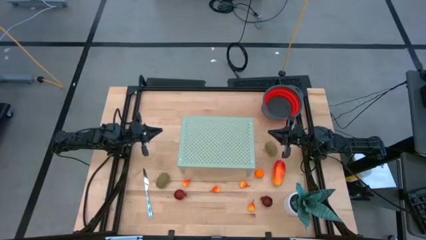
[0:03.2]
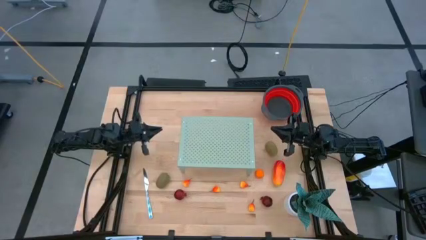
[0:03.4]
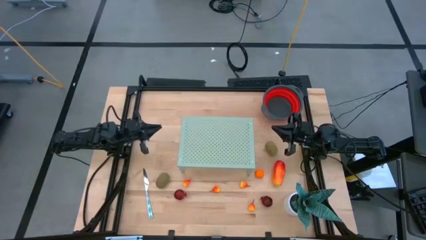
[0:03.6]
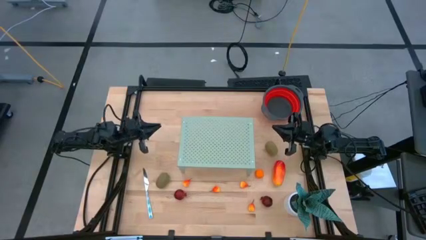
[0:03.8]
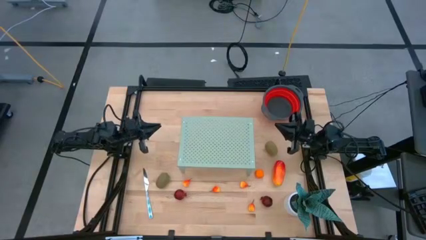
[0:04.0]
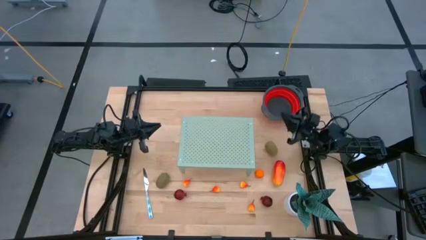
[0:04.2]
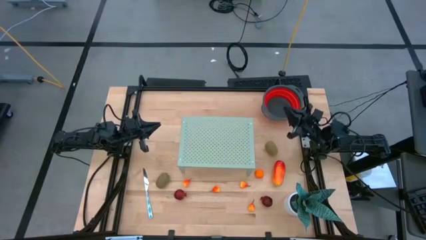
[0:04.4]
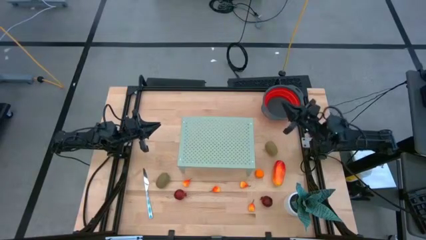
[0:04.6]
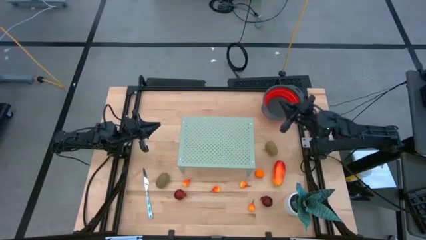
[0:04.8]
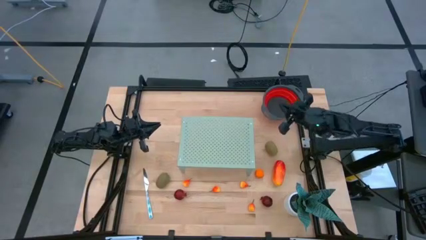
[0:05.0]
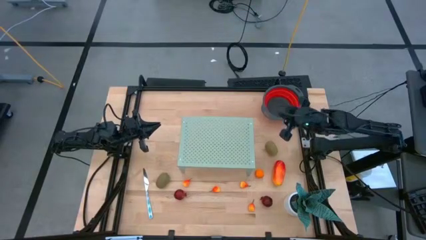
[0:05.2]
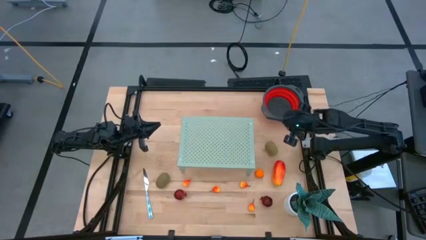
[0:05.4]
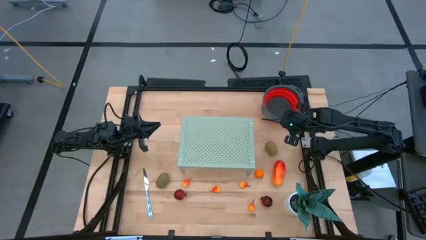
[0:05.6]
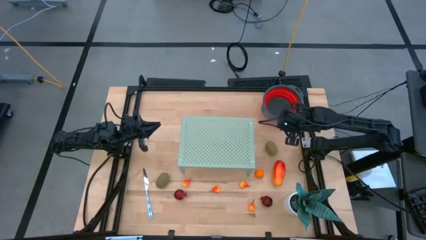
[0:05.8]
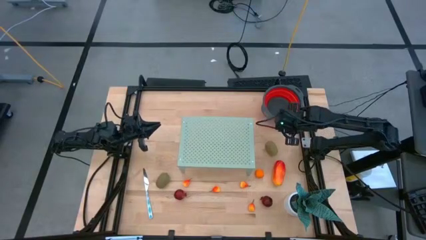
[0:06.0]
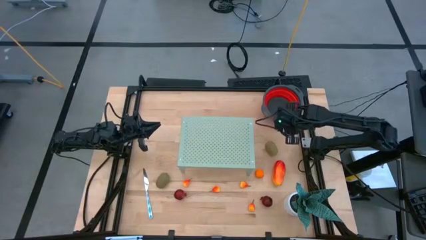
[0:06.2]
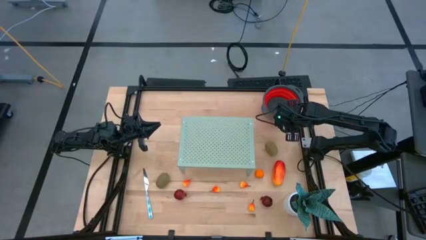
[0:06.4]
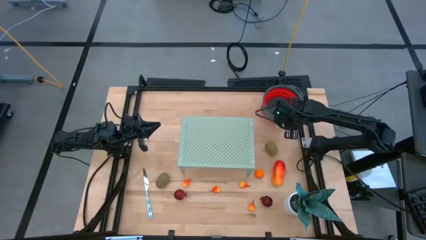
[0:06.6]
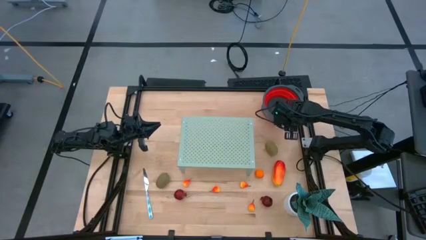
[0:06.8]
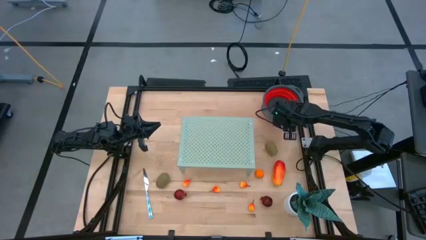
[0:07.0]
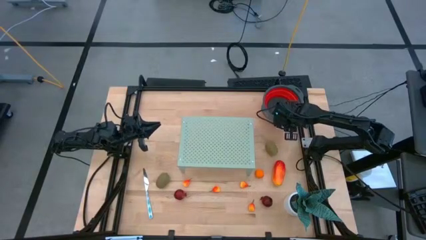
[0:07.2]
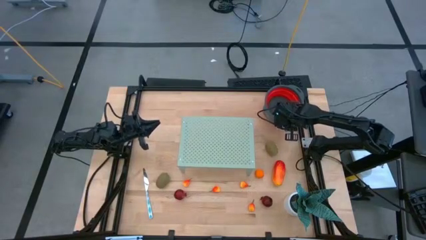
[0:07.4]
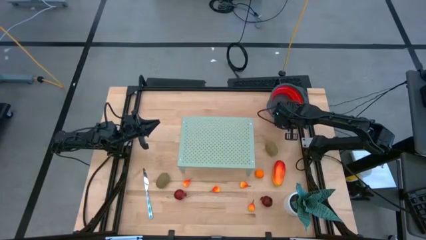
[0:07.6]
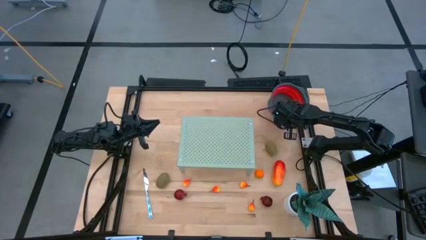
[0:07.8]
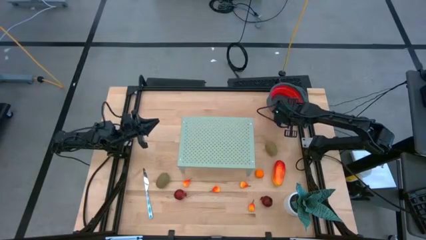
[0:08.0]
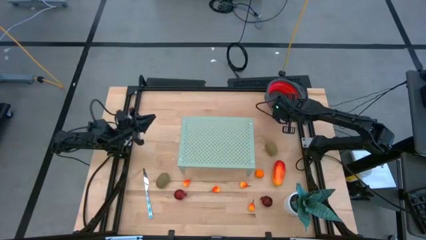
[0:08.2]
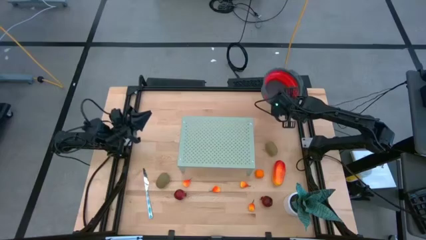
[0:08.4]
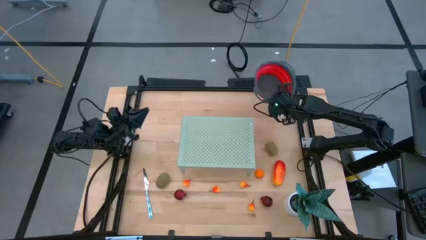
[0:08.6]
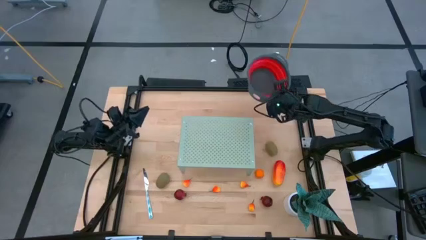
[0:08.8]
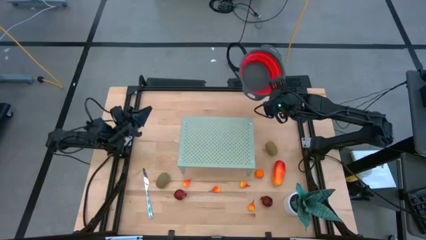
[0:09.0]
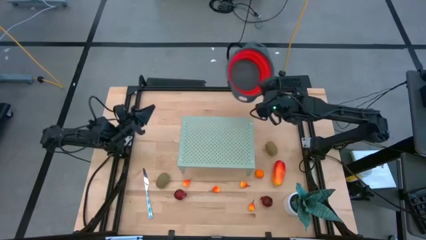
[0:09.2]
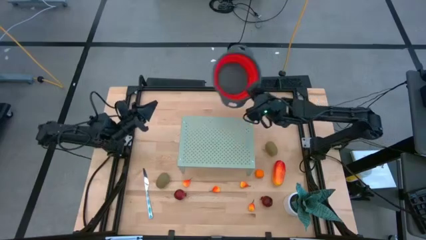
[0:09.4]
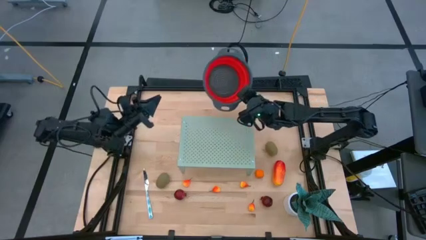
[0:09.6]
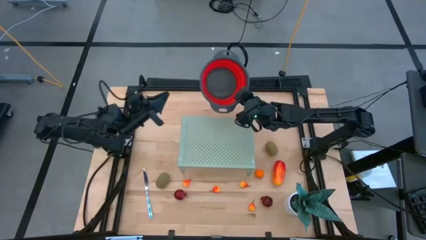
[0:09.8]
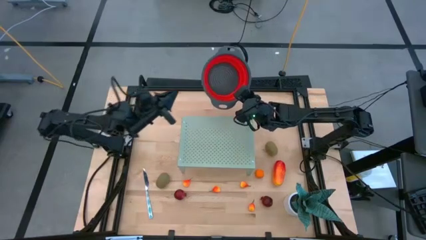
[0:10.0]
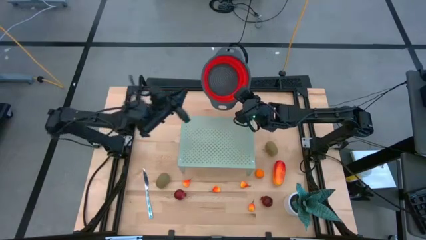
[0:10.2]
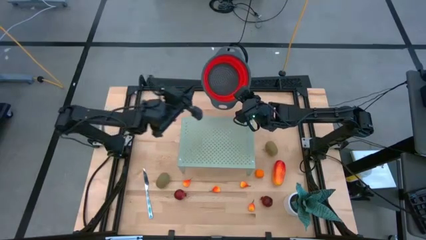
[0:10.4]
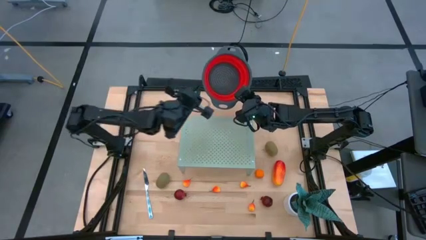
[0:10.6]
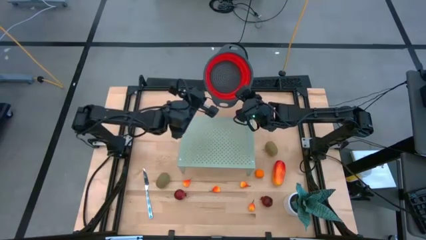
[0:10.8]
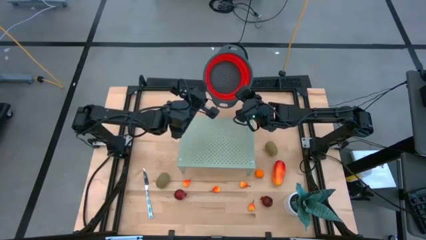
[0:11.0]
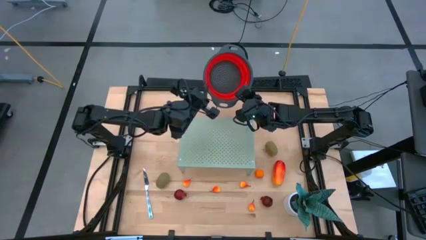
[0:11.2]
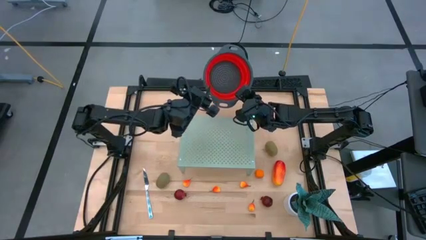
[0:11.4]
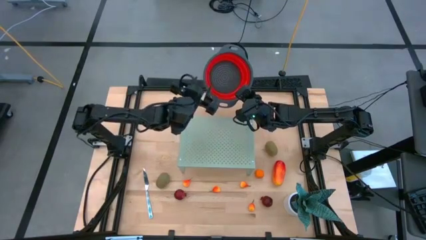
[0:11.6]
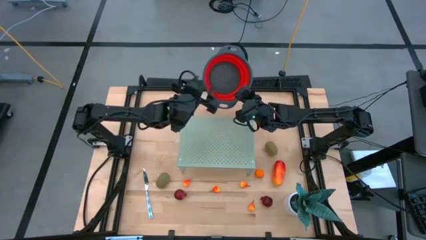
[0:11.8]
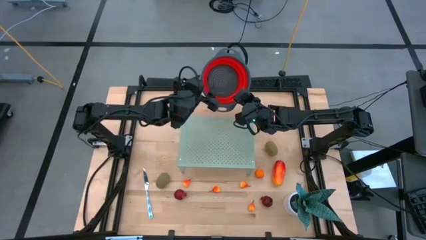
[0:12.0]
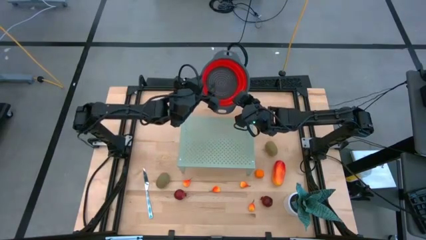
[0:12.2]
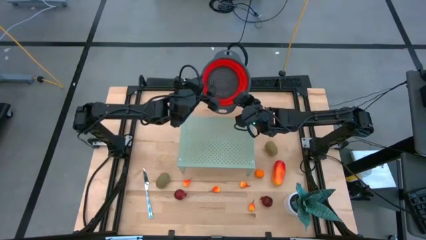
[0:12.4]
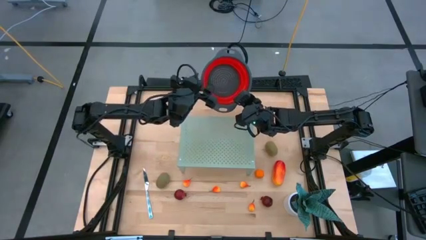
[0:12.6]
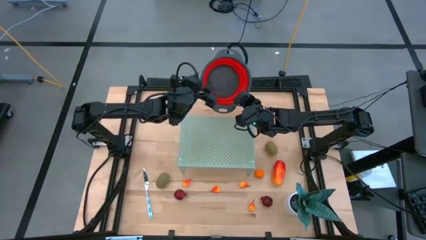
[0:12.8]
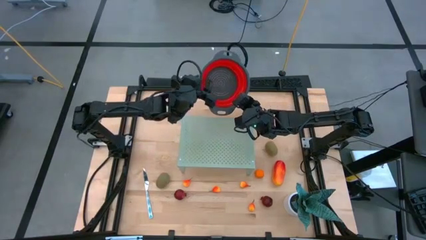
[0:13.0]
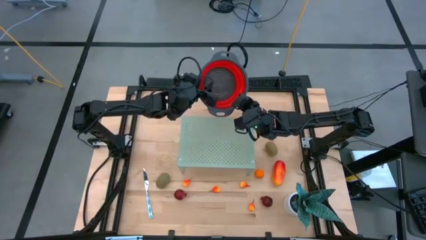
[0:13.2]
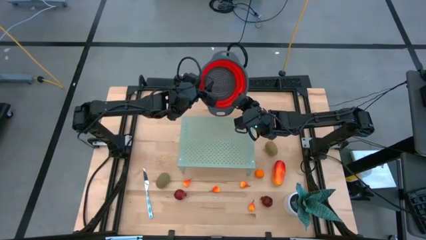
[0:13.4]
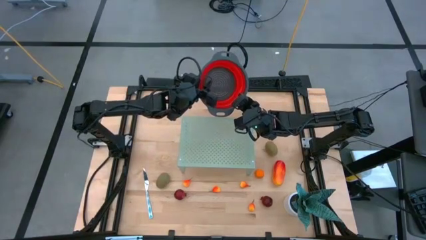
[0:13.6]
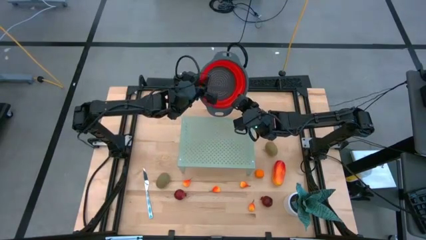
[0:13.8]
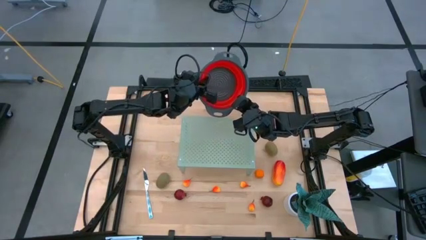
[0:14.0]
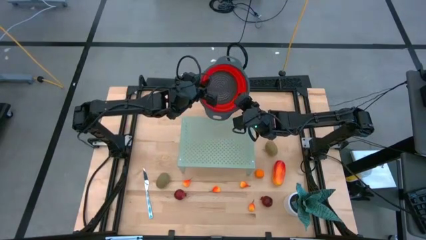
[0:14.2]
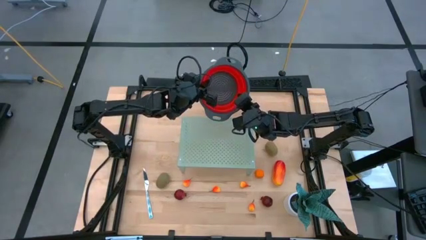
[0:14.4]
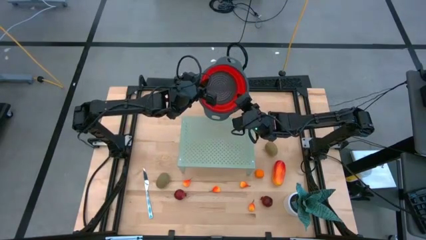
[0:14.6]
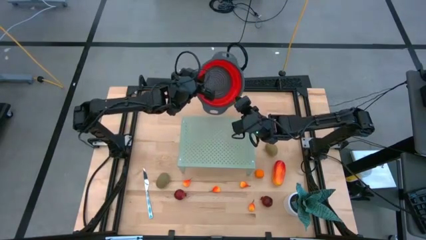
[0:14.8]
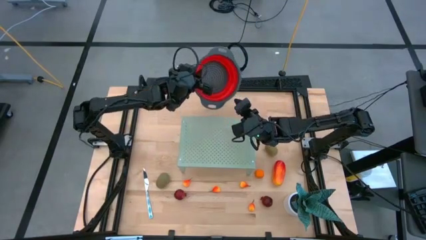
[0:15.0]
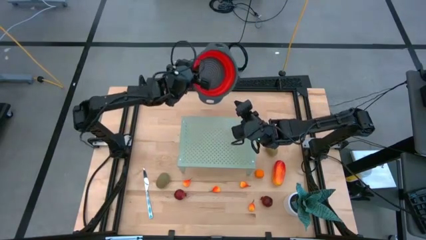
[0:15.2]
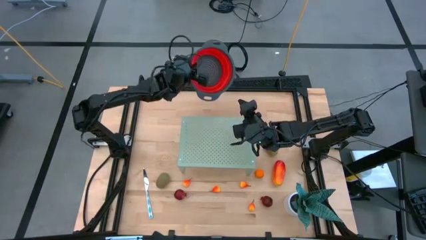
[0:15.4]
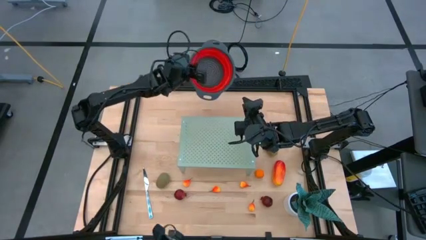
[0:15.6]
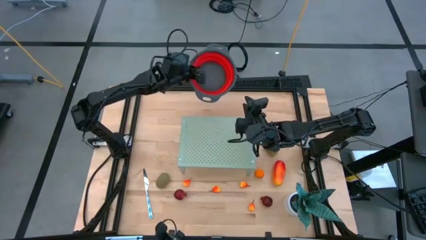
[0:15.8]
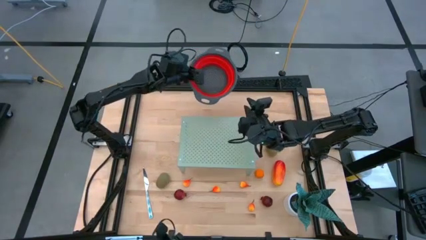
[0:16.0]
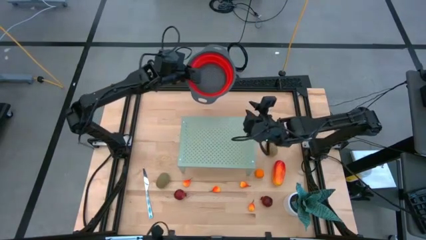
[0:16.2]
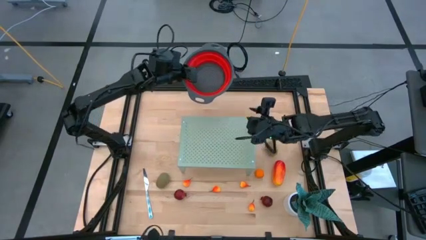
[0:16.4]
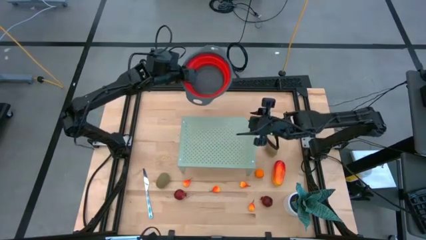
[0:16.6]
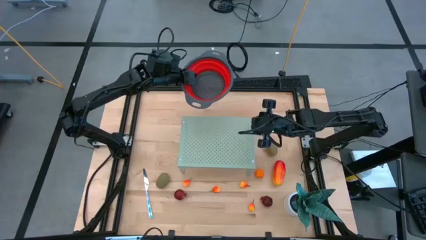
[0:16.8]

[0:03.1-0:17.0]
Task: Pick & Place Fruit
Put the strainer on the shelf
